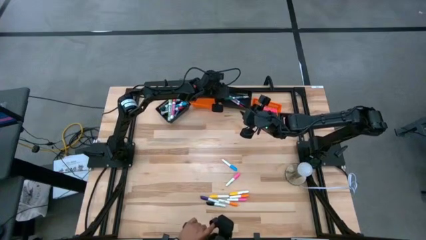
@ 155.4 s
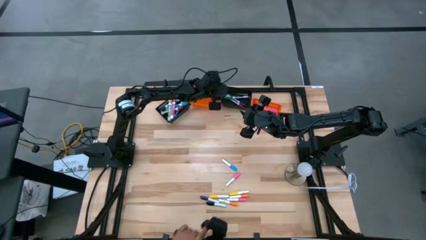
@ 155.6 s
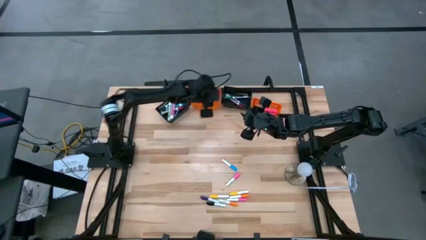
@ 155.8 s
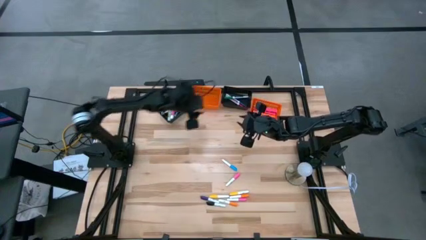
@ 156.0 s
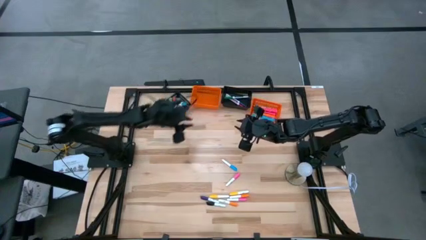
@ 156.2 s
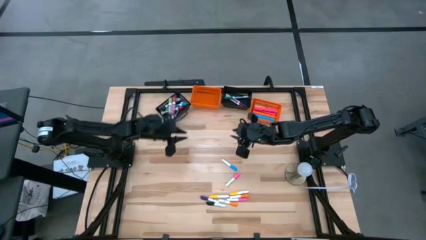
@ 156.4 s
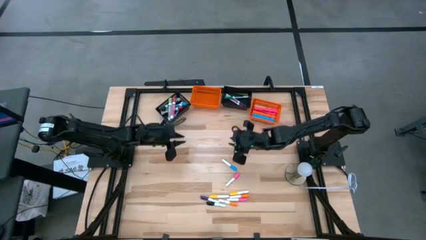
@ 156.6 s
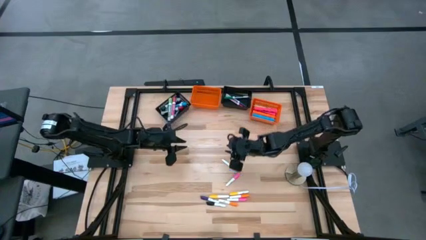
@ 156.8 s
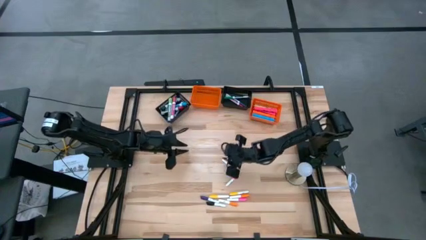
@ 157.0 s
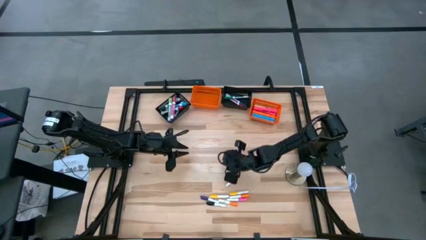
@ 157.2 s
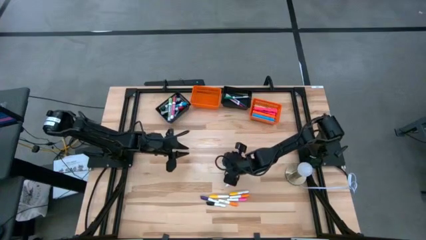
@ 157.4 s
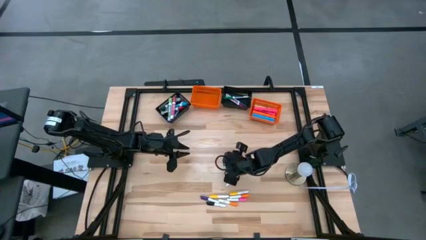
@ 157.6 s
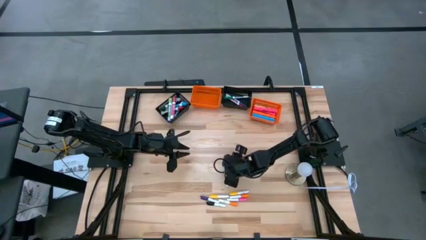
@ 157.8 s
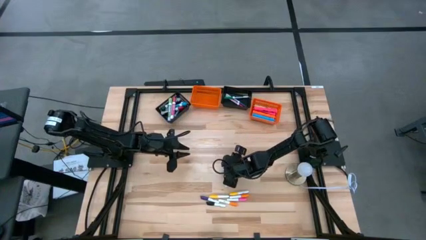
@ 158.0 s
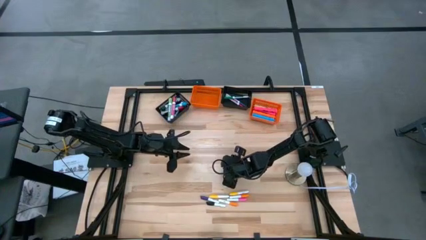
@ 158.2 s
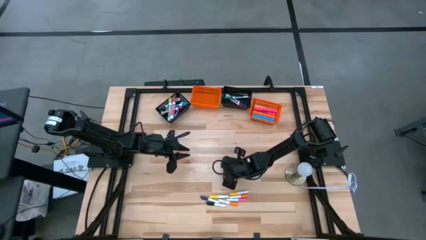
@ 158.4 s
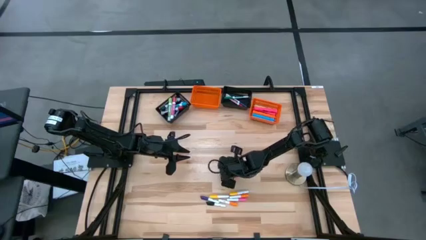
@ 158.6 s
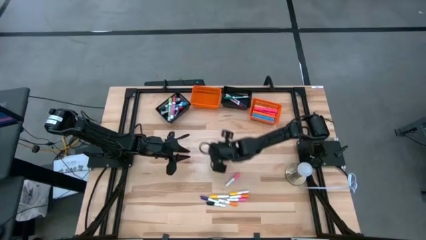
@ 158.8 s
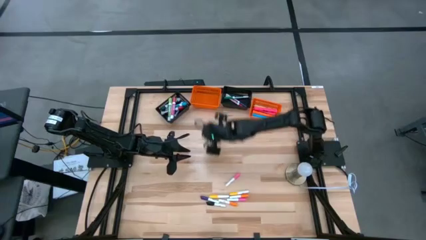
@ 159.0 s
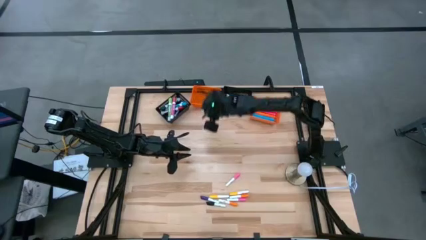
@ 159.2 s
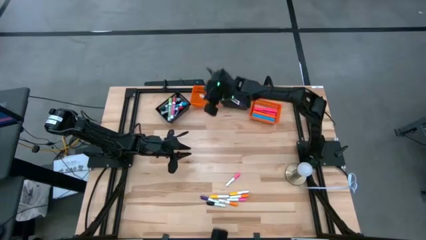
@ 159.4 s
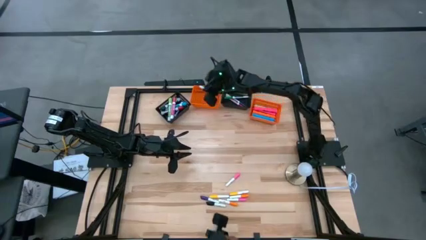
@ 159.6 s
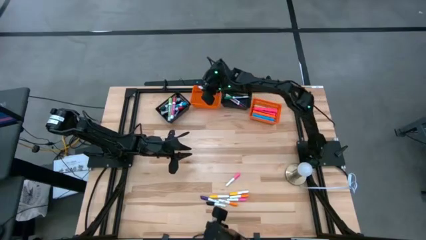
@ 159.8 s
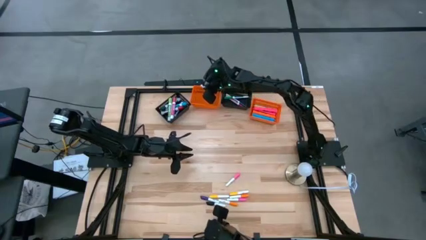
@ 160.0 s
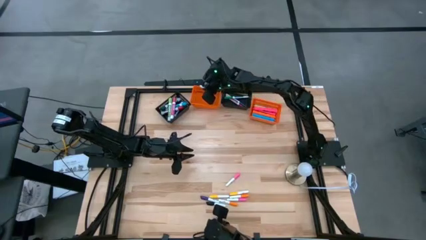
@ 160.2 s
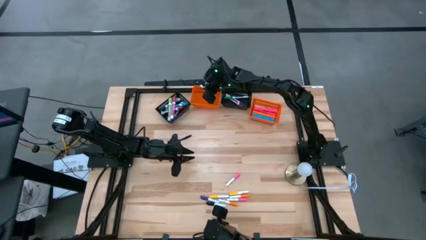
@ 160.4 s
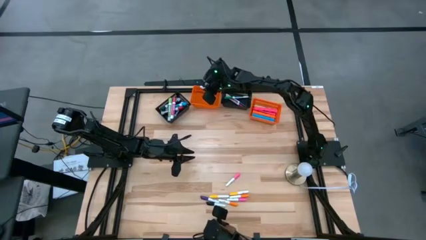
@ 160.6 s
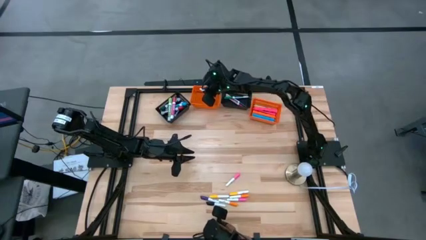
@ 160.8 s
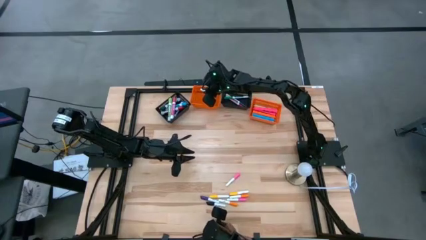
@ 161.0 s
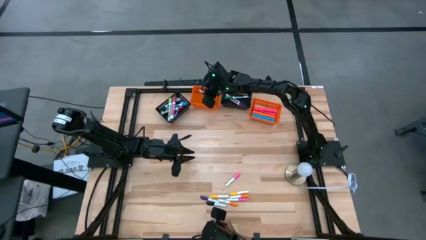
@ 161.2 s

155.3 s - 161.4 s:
Task: Pick & Place Markers
Put the small light blue highlighter into the left orange bin

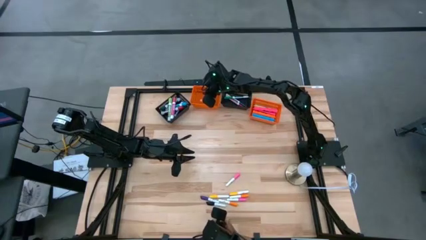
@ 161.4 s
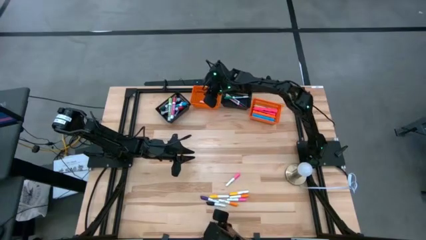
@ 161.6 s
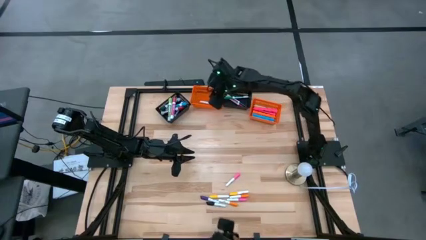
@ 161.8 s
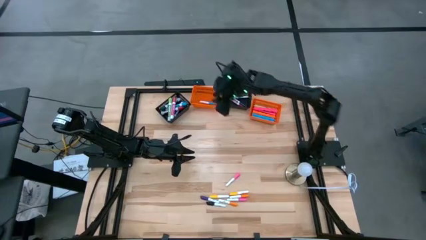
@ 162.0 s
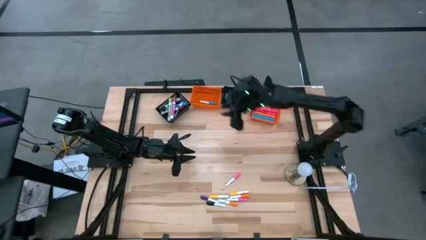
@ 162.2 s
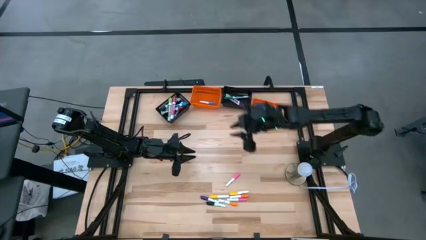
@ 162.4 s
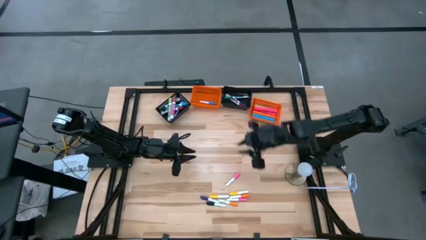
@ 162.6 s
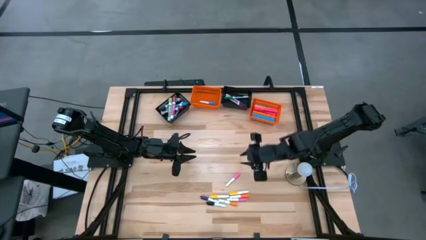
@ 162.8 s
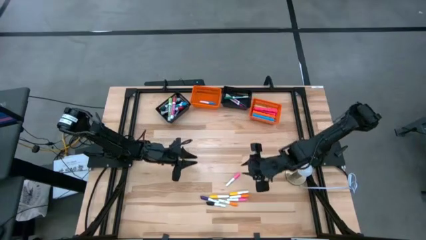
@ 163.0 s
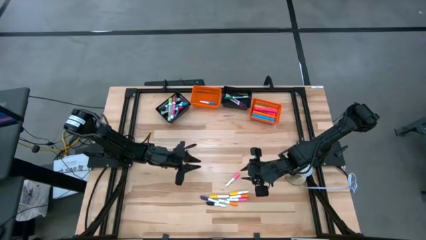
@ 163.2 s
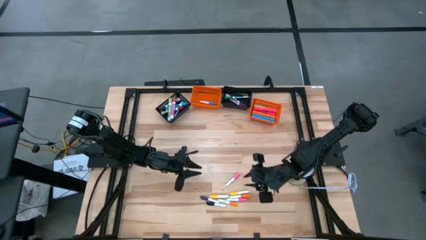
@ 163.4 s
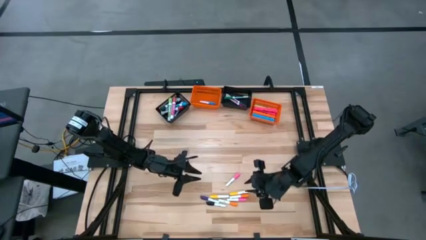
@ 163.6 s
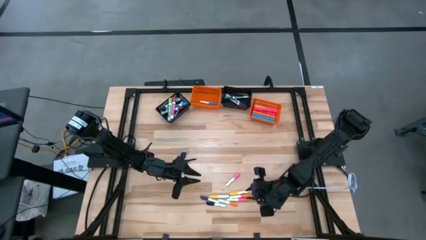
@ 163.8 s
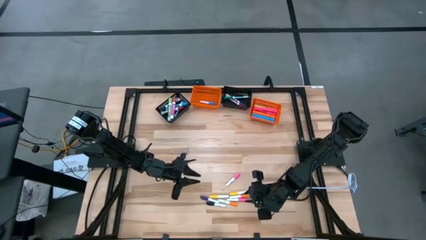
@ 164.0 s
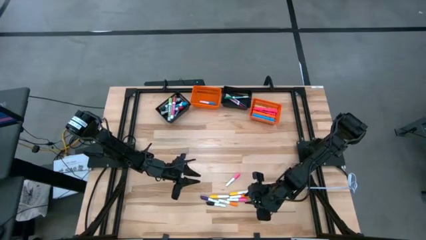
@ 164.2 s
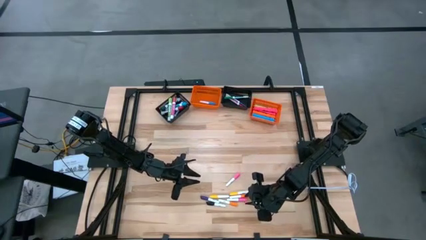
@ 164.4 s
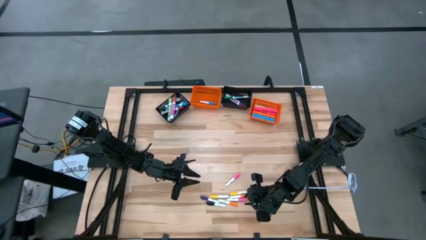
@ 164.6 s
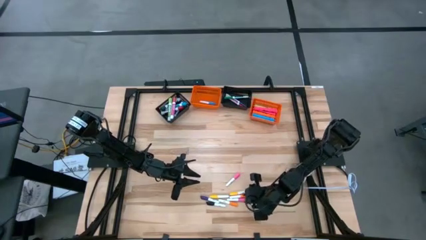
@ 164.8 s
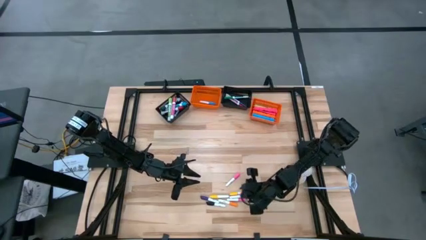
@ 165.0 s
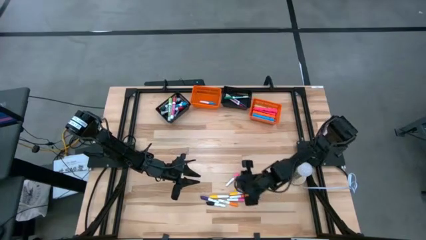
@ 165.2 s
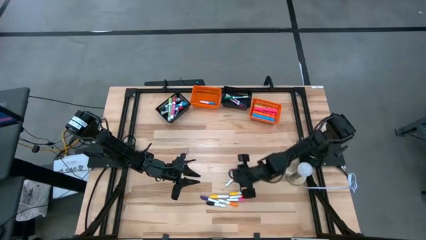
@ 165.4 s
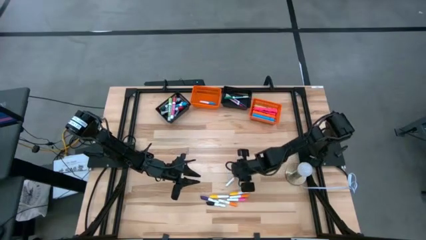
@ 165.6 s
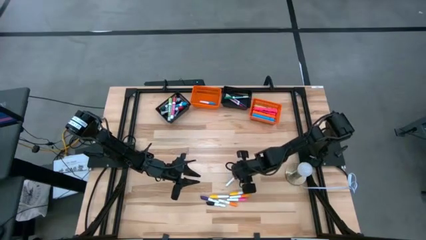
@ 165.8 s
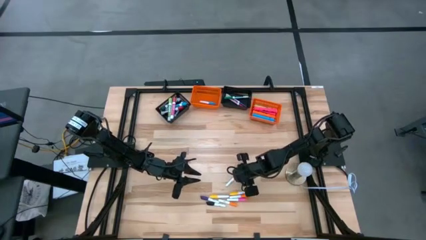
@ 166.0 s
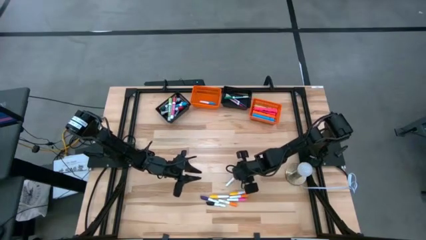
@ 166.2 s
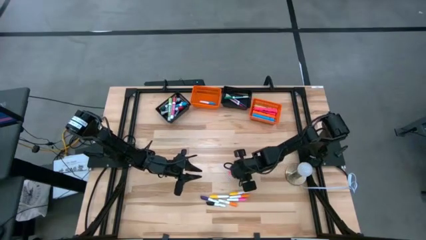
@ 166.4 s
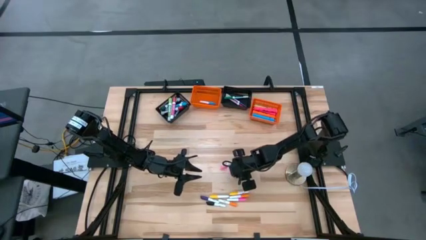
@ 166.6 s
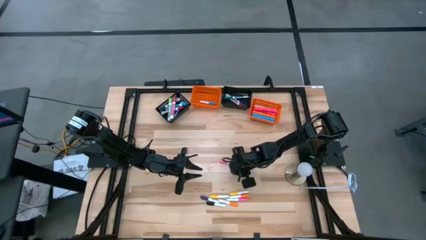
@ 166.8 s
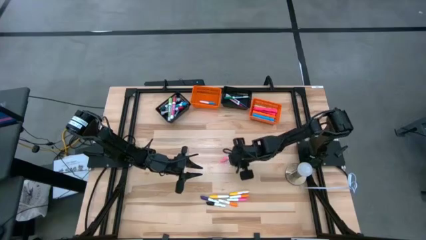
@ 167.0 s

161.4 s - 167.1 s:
Put the small pink highlighter into the left orange bin

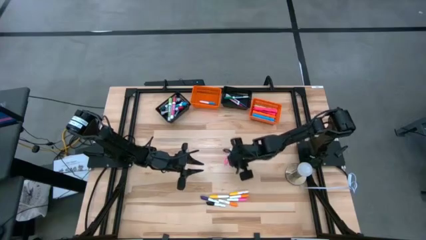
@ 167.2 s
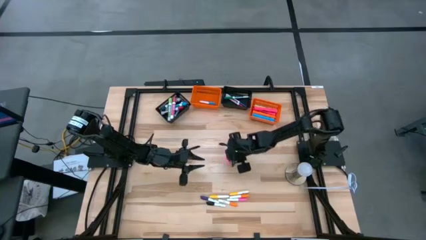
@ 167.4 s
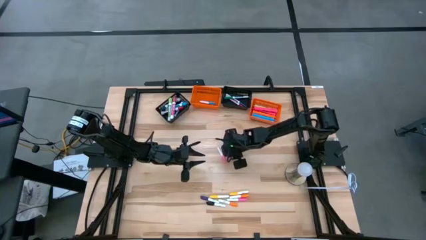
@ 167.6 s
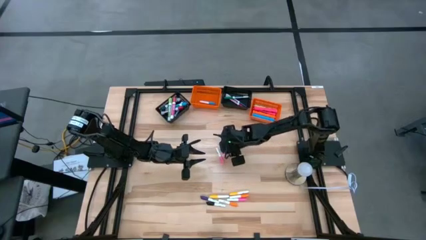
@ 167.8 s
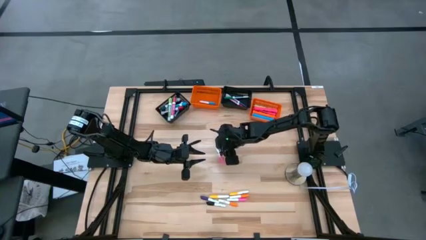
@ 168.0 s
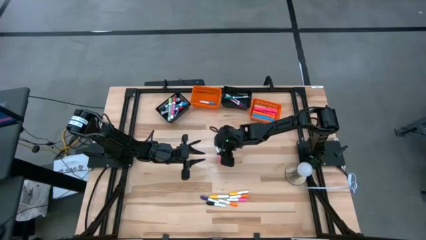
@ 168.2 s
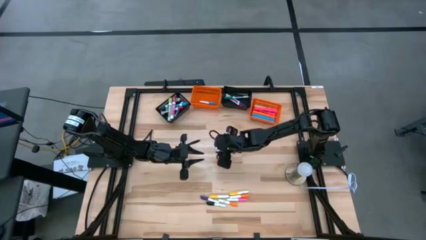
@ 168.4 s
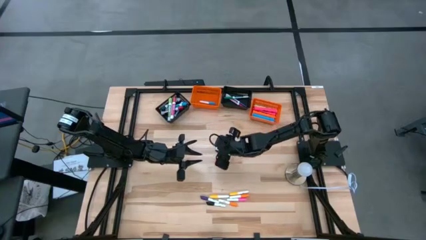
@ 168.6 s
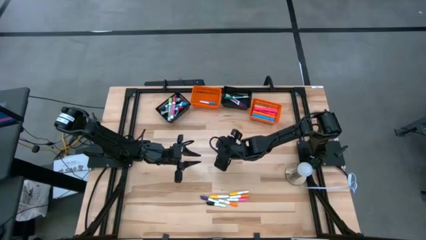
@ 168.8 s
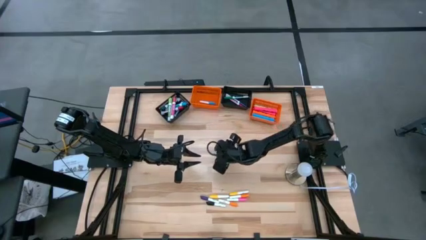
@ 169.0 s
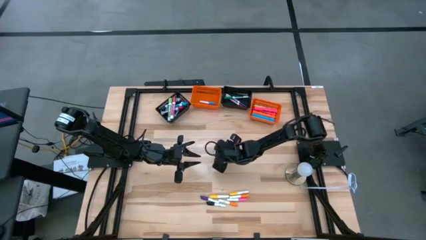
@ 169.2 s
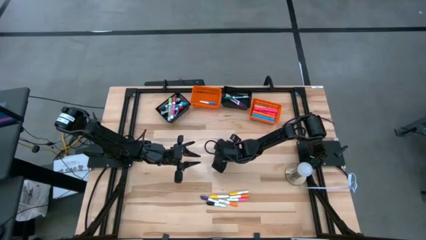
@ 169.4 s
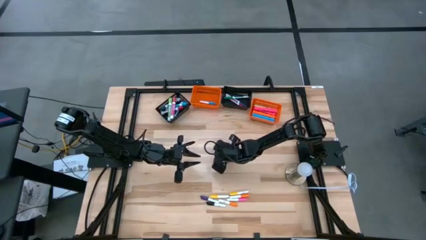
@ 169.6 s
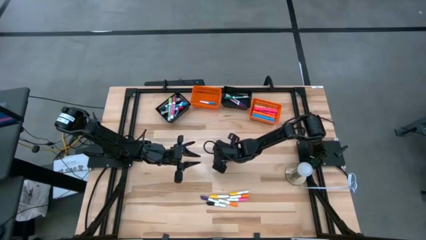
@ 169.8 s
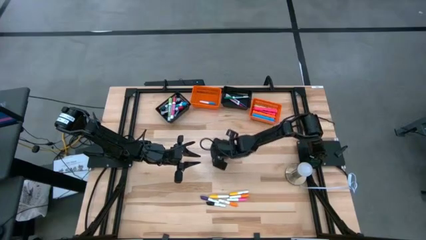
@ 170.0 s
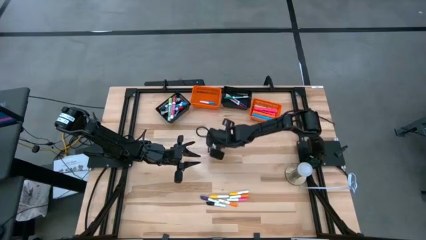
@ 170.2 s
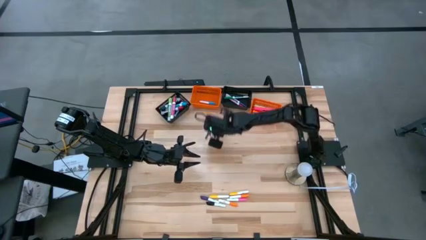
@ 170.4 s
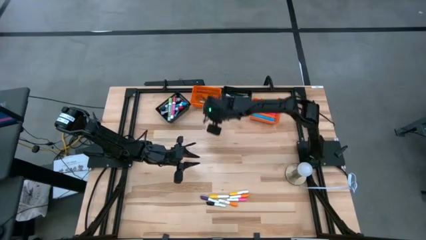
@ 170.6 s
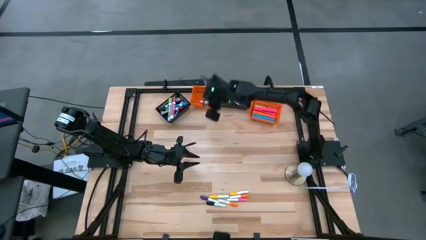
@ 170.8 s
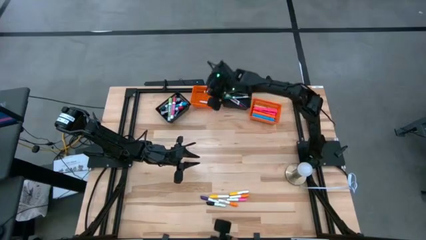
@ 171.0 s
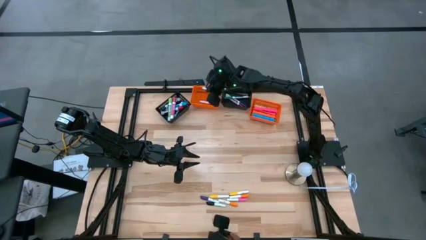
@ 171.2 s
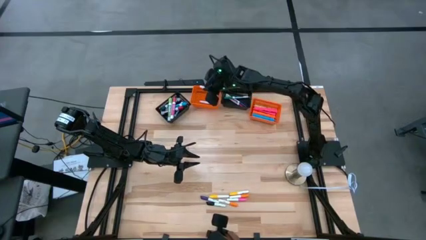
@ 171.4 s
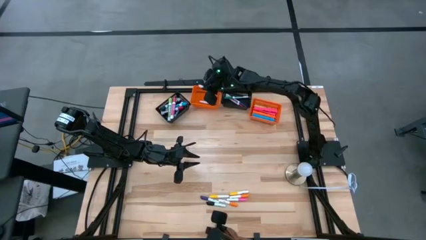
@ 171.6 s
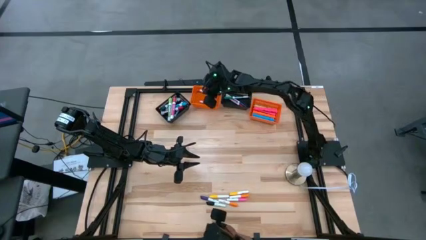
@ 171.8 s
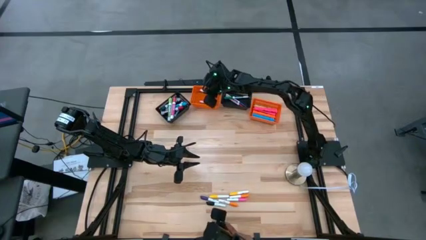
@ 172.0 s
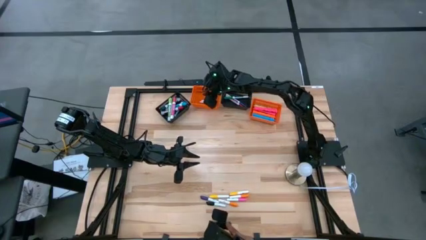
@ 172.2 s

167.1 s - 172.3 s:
Put the small pink highlighter into the left orange bin
